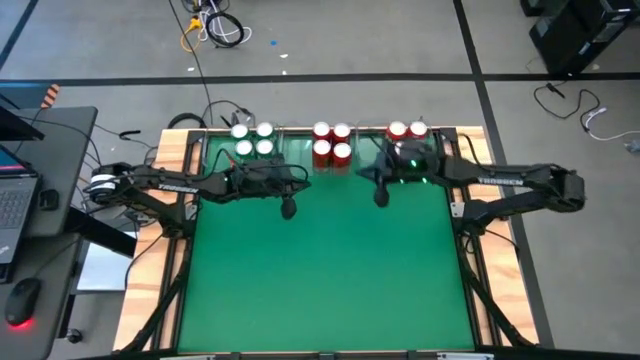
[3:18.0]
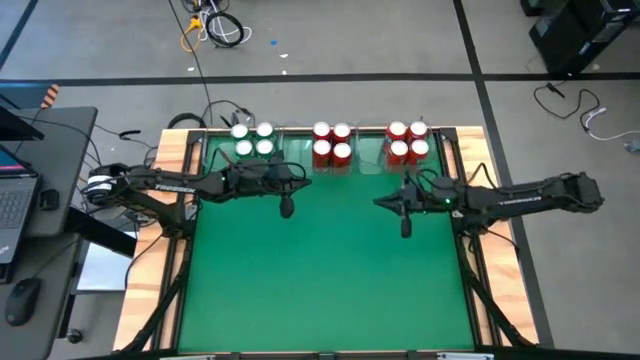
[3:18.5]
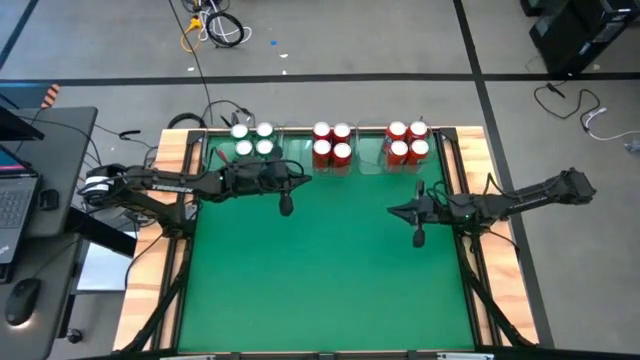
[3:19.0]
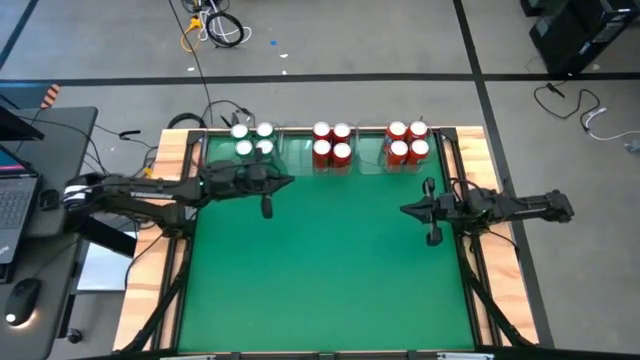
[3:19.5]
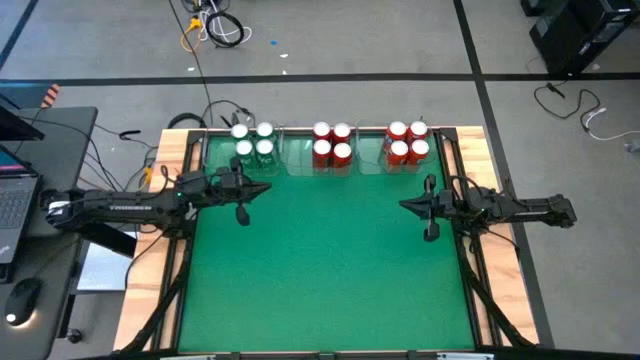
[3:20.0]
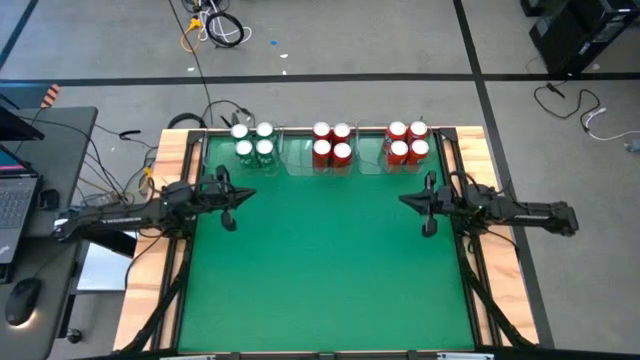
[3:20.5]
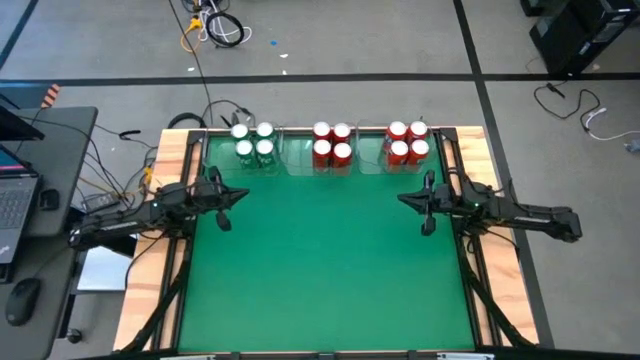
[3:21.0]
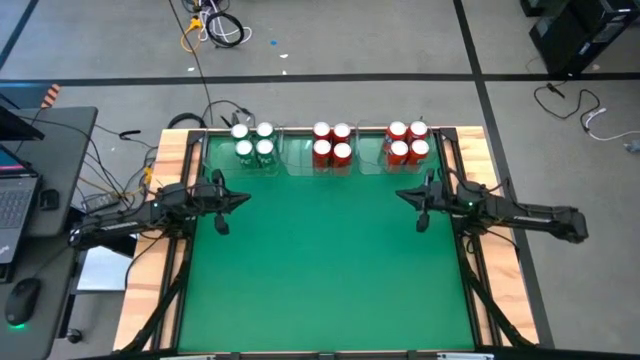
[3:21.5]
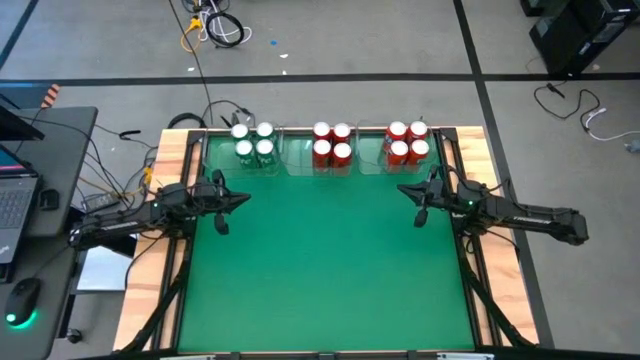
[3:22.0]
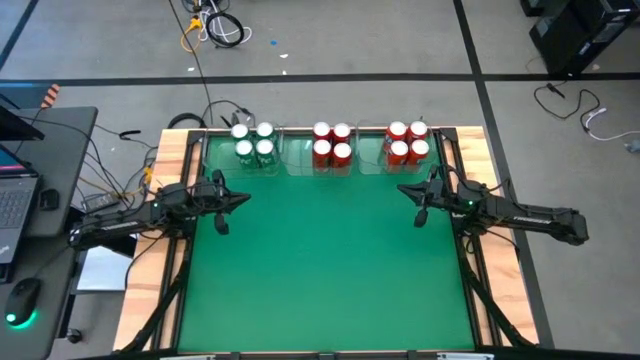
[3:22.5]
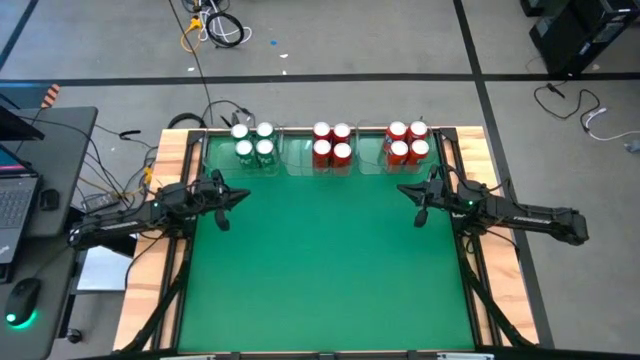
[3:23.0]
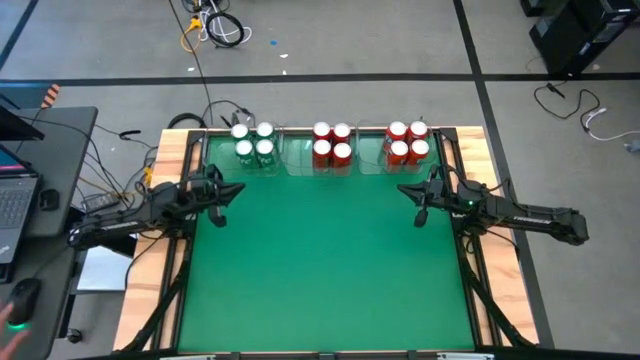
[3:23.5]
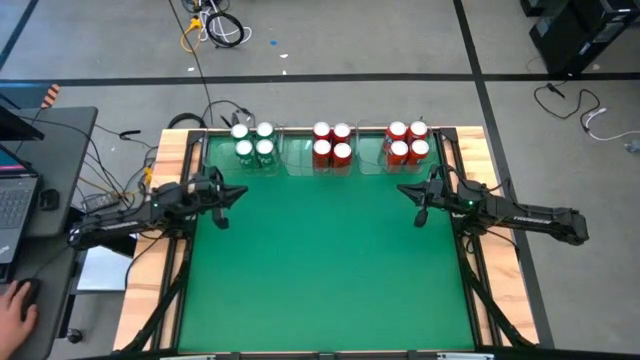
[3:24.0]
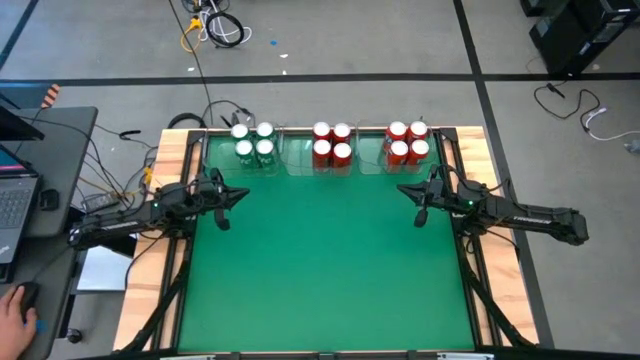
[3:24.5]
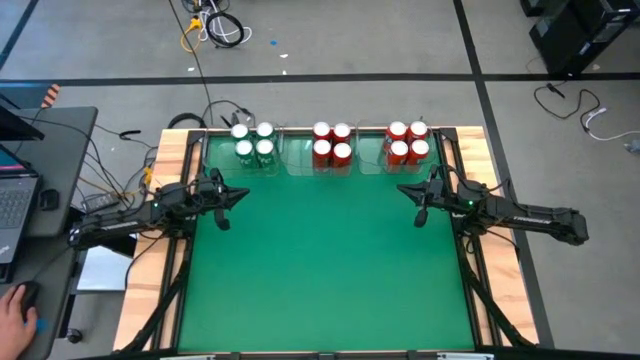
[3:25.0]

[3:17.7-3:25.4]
Task: Sort soda cans
Return to Home Position
